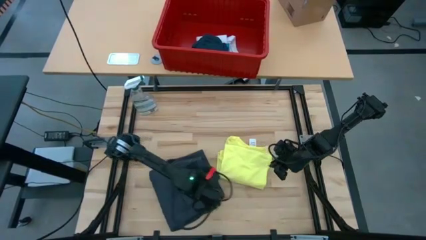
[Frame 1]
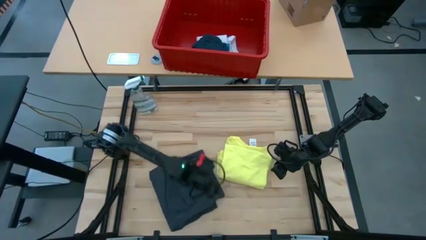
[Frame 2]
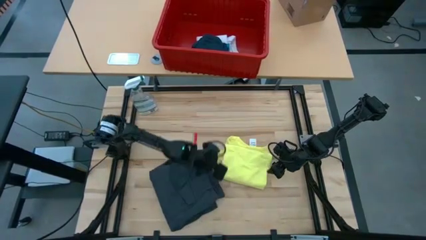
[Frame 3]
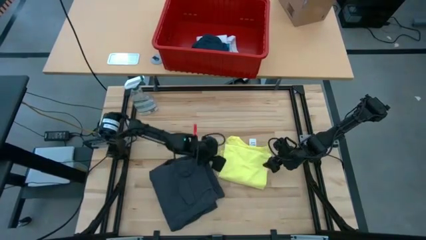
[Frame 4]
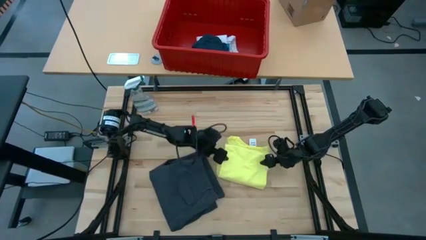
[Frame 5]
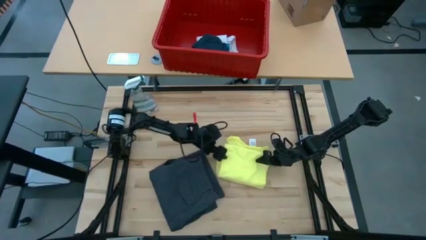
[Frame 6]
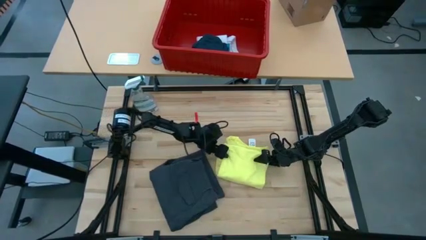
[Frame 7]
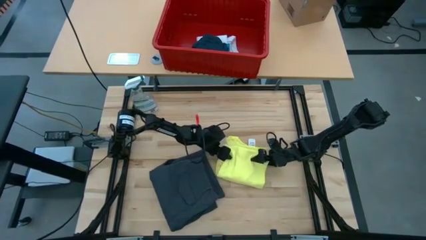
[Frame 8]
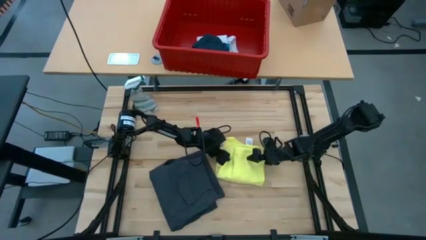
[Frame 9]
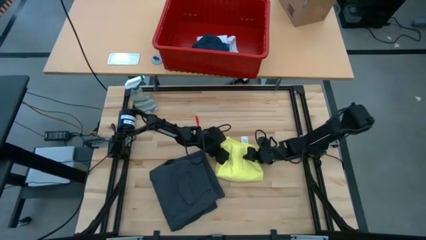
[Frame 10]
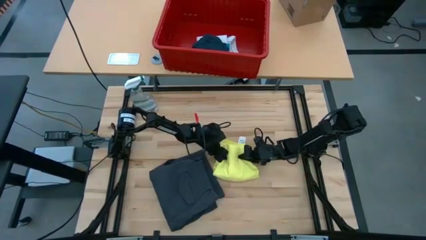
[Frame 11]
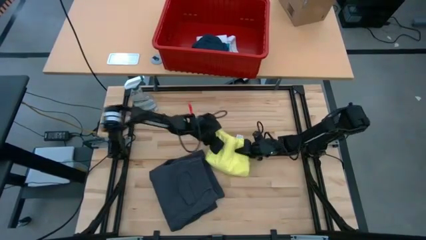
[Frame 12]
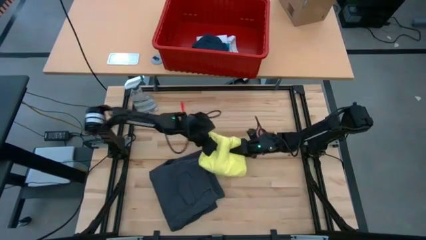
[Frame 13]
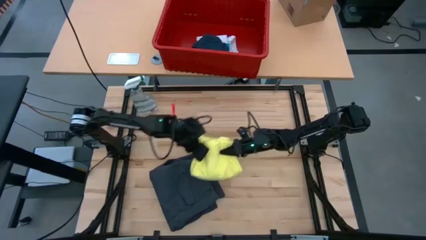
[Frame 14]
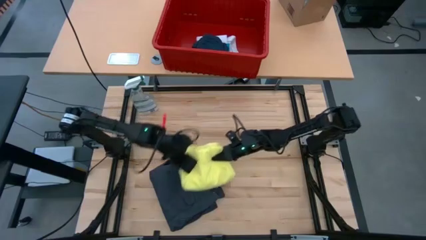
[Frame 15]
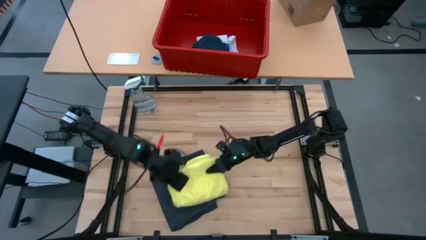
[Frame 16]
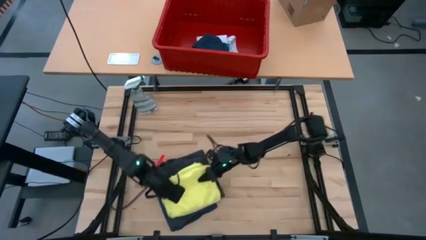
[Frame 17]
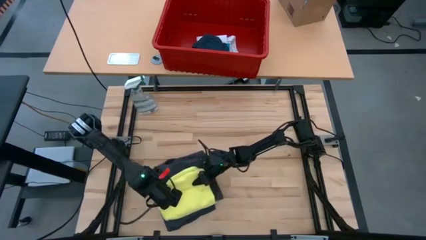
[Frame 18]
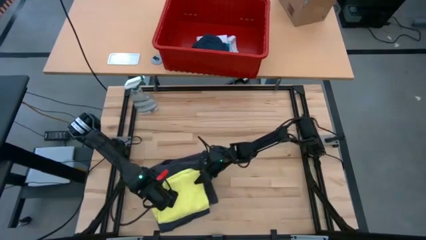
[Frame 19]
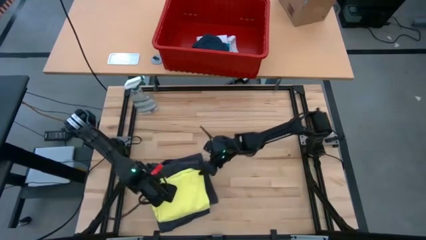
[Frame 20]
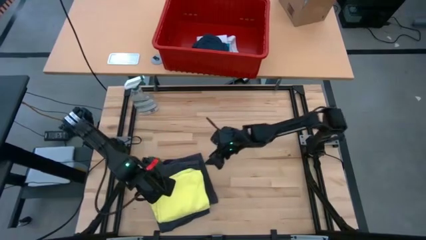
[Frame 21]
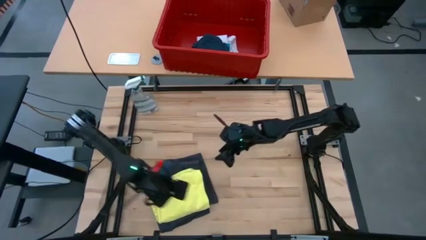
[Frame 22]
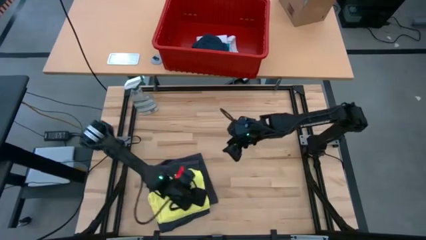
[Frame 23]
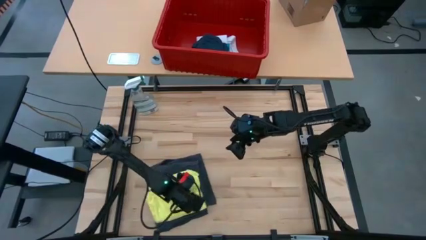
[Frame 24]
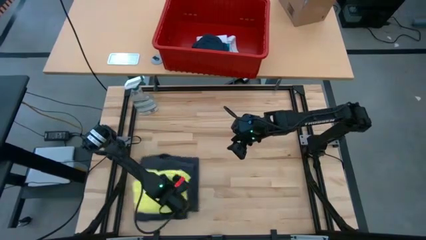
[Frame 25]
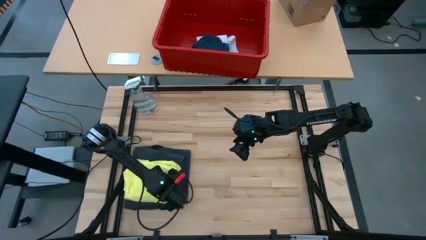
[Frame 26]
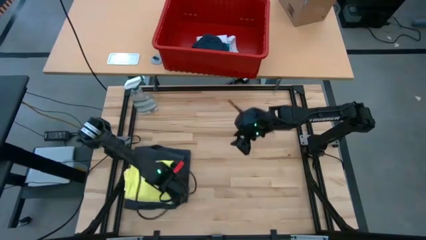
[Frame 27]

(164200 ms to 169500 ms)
Task: Fold Laundry from Bin
Stack the yellow shirt on top of the black short

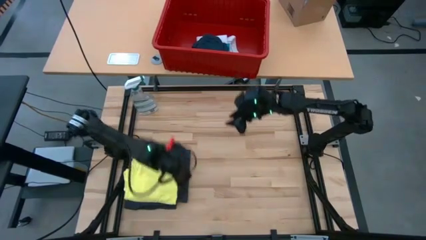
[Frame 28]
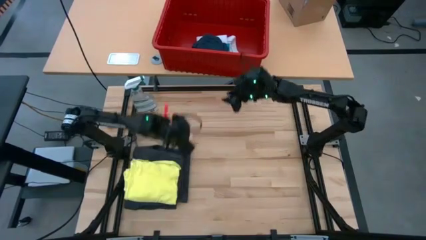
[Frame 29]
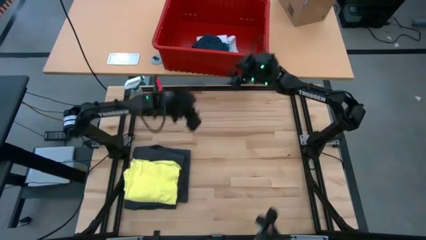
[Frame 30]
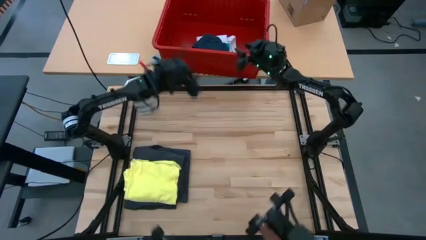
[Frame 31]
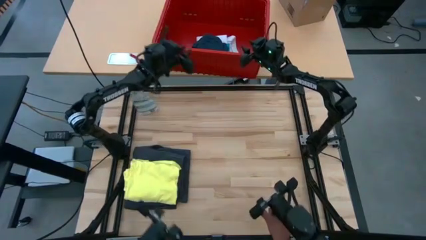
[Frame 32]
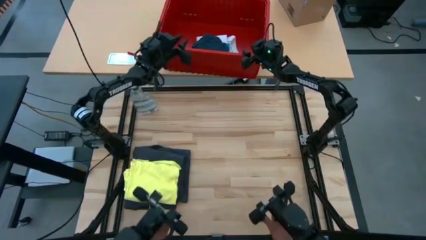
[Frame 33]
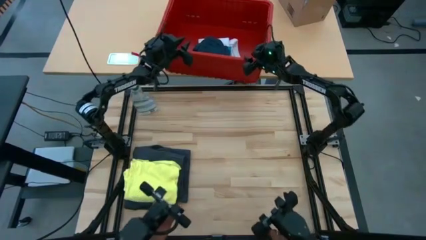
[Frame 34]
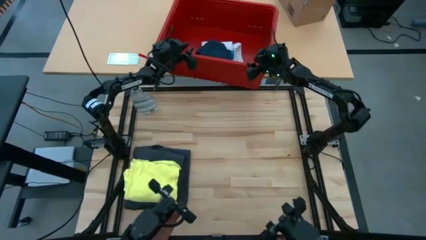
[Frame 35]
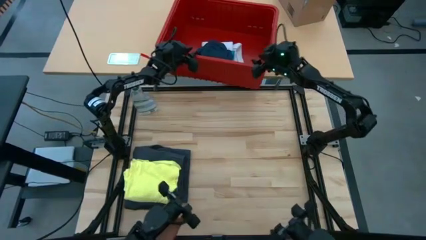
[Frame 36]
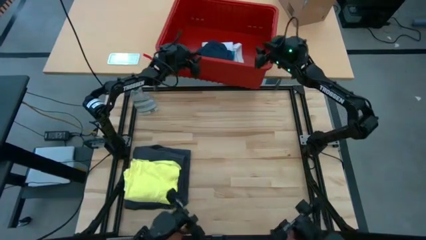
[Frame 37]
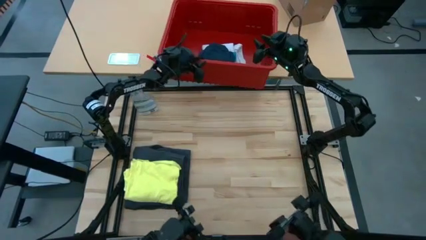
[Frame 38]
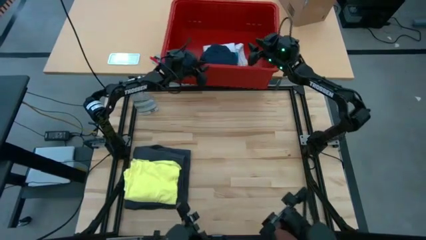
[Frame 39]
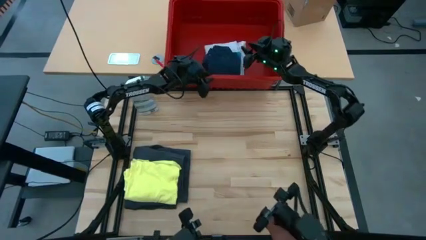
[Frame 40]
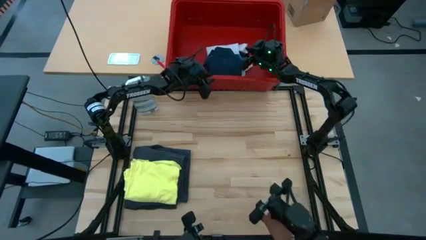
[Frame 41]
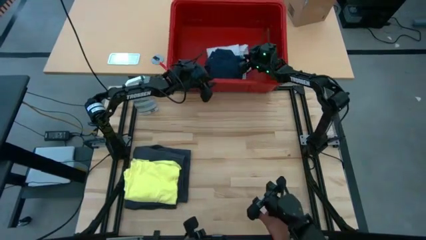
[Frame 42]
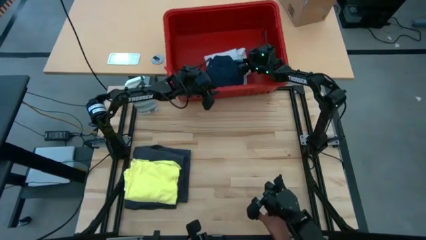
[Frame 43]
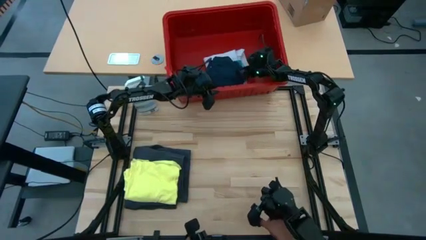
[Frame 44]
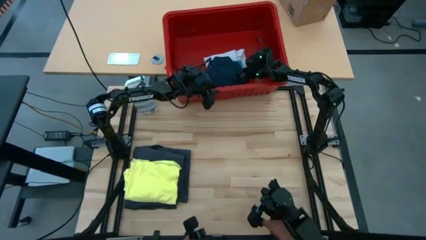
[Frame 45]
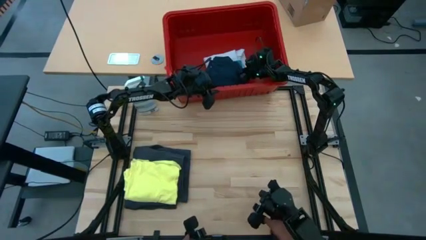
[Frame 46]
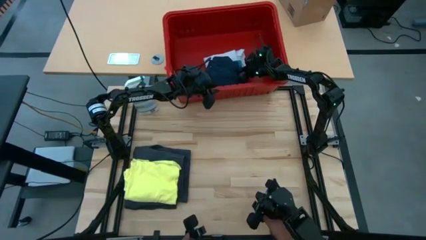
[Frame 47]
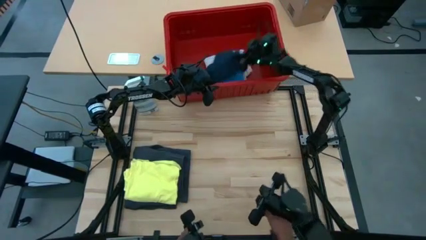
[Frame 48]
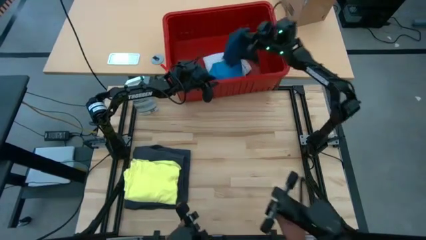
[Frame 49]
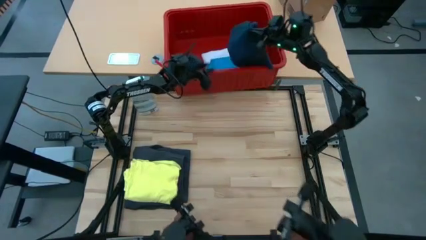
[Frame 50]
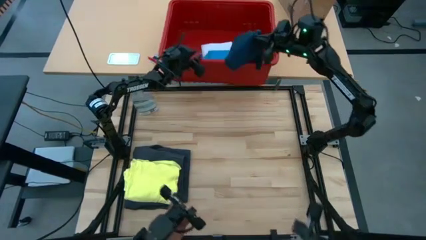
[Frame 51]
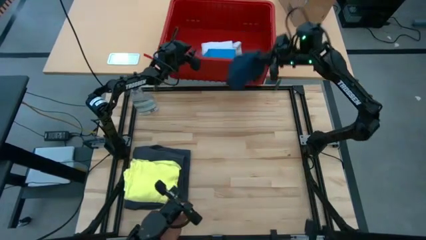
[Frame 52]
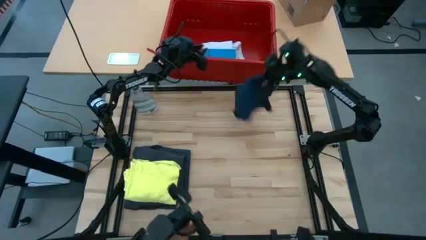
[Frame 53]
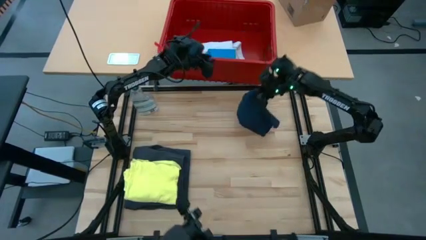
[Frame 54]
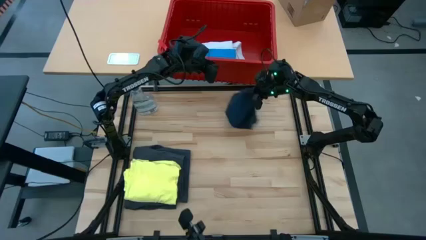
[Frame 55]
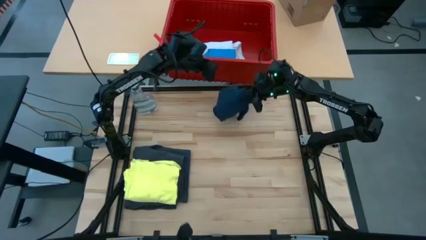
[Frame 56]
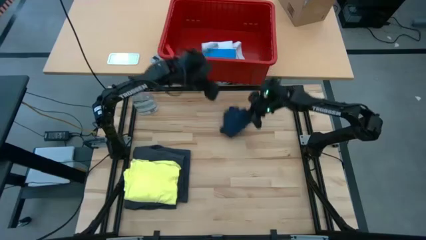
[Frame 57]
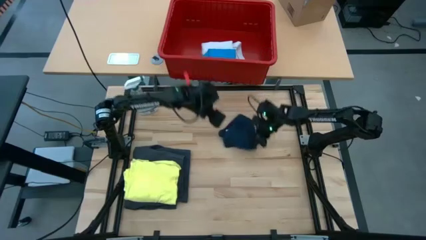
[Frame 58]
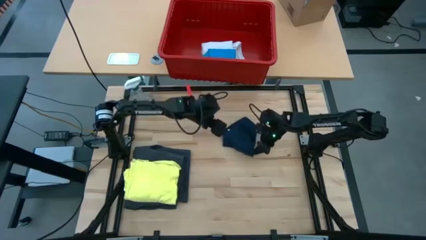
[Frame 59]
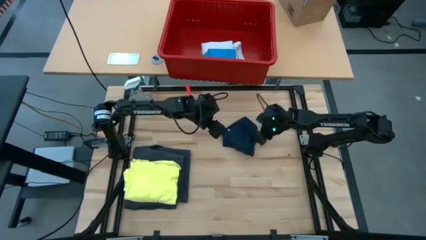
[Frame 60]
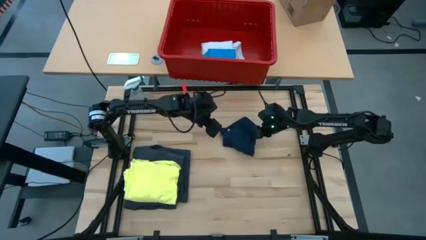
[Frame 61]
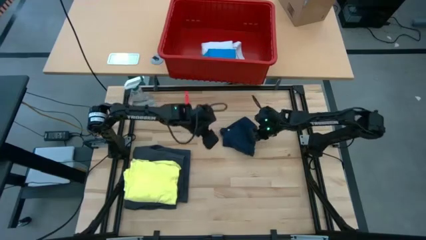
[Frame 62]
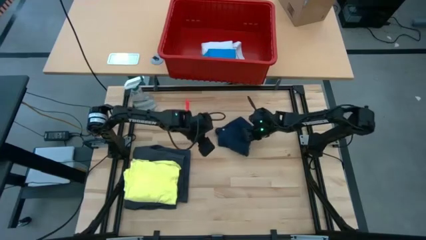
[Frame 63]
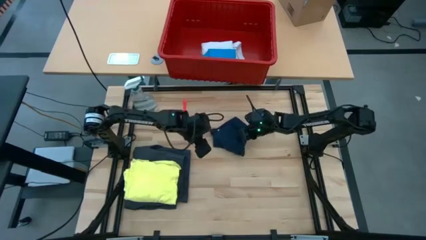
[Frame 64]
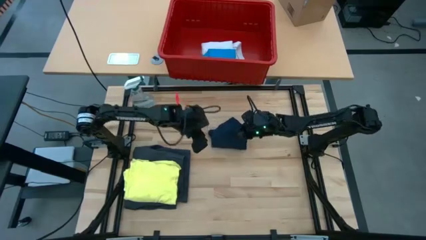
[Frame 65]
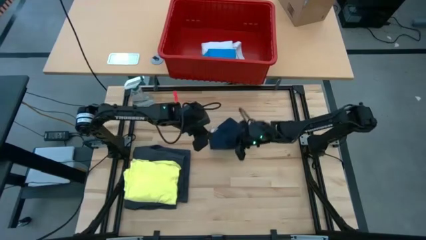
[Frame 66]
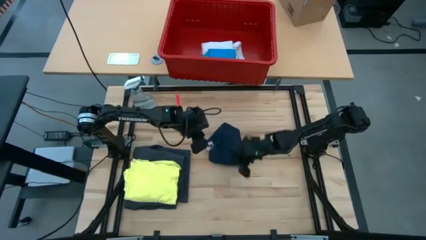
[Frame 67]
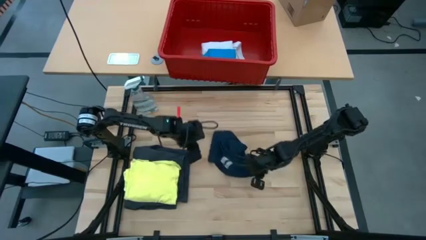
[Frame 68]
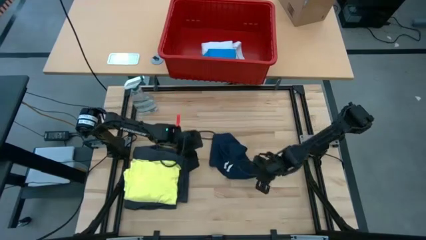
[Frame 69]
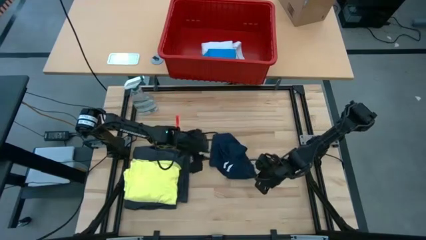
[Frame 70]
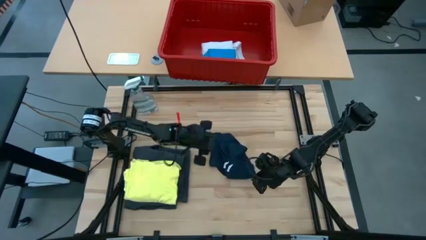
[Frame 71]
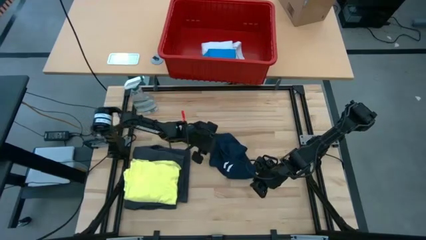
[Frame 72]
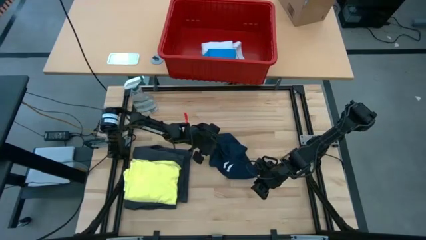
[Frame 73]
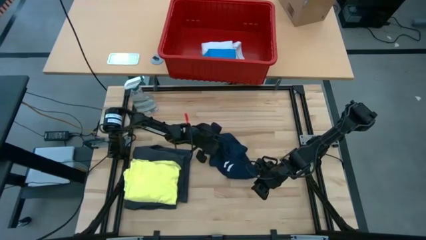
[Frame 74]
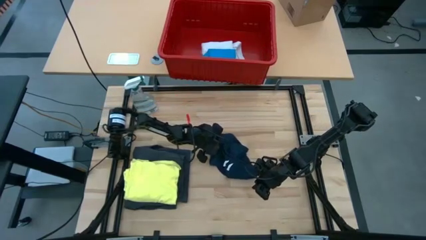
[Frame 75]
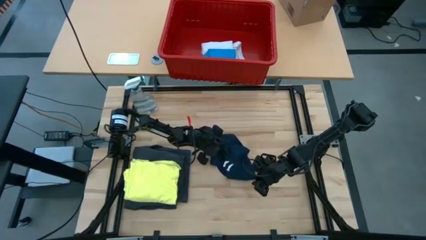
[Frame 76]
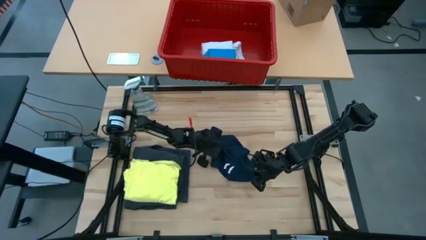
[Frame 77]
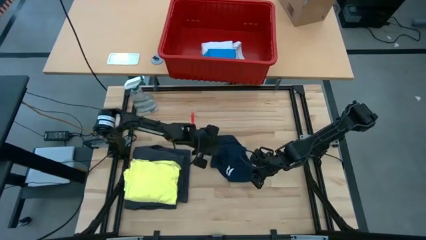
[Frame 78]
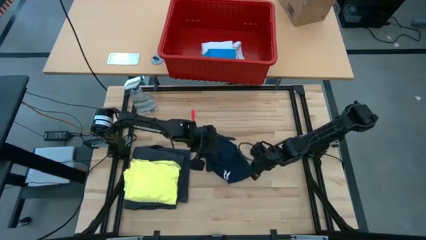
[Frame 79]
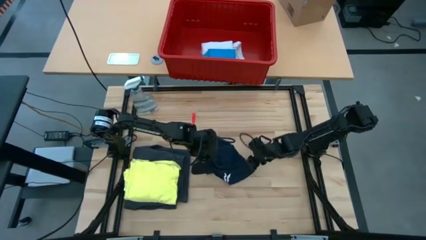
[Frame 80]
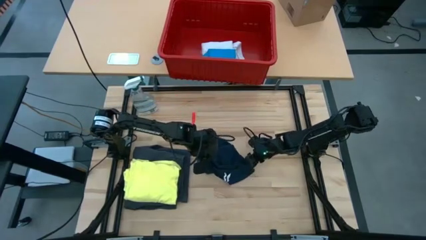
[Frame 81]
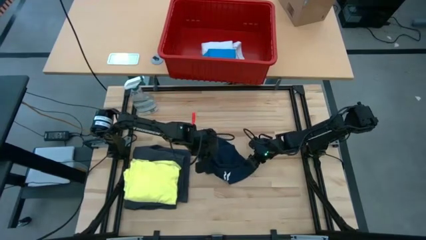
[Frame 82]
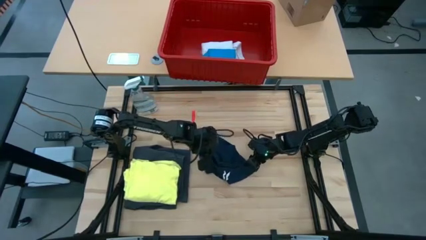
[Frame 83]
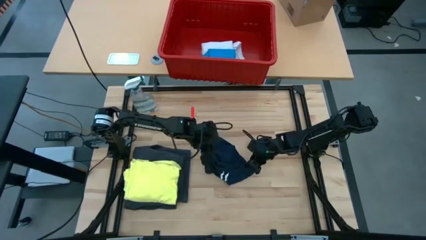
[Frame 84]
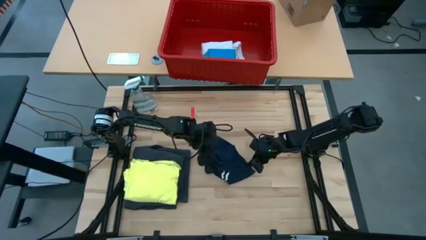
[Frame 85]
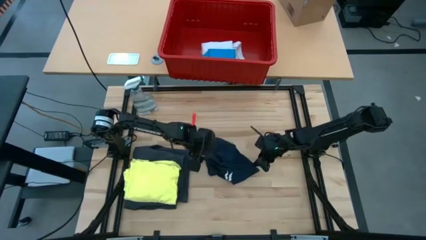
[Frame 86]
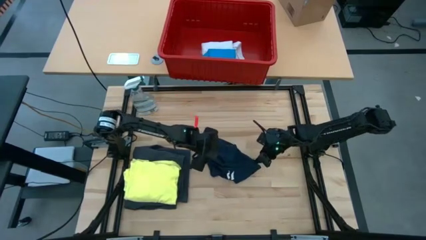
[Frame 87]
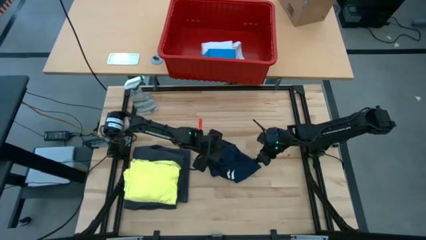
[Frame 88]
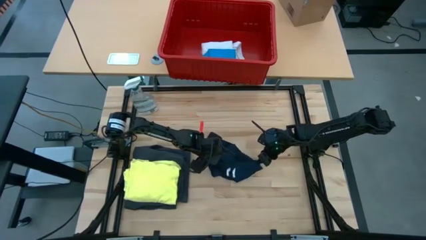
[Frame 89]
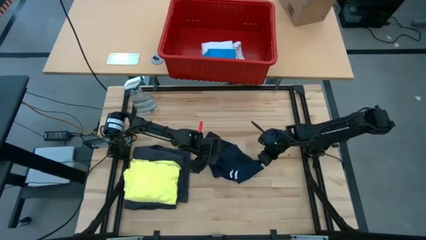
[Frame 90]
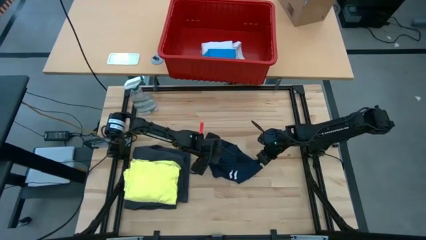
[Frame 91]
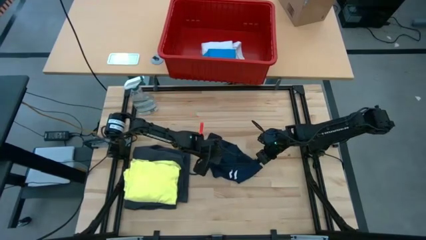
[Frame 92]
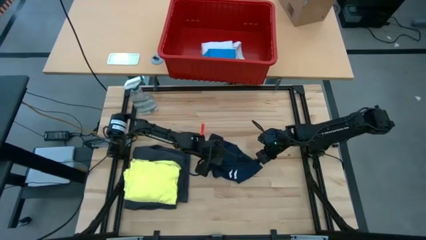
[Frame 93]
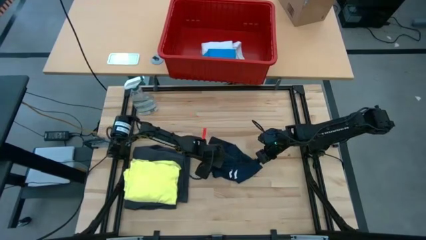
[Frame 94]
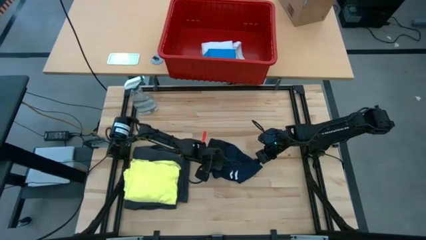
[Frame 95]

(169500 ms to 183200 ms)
Fold the dark blue short
